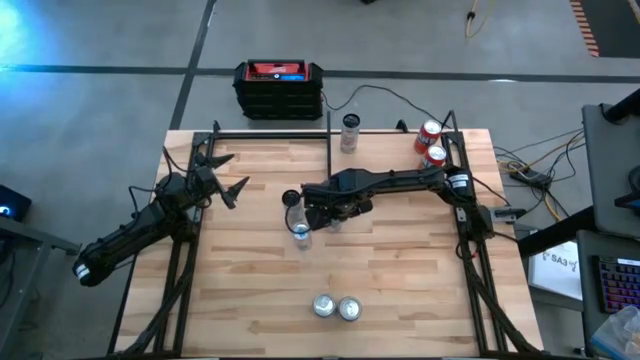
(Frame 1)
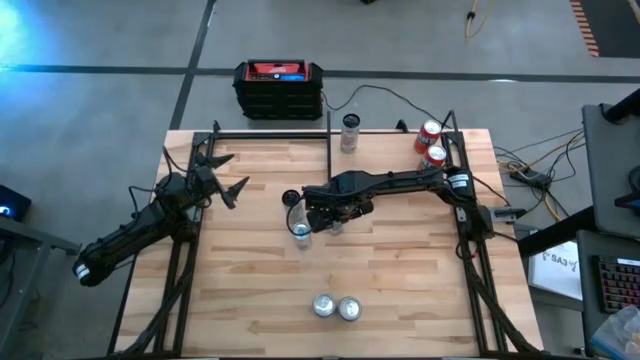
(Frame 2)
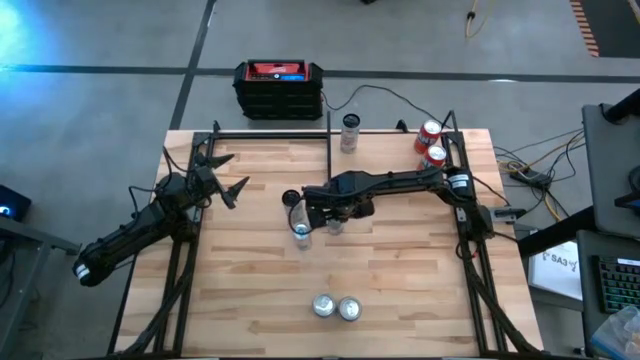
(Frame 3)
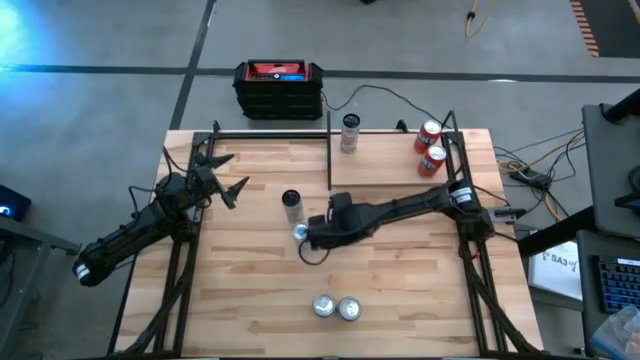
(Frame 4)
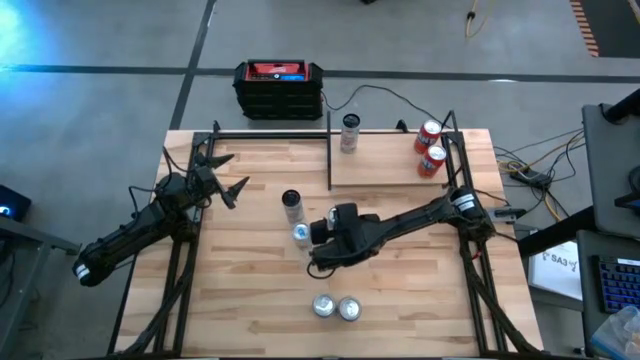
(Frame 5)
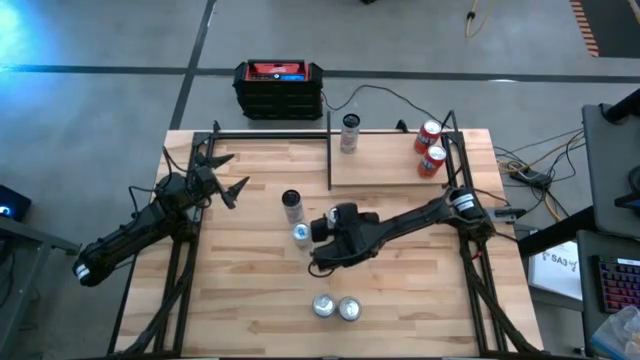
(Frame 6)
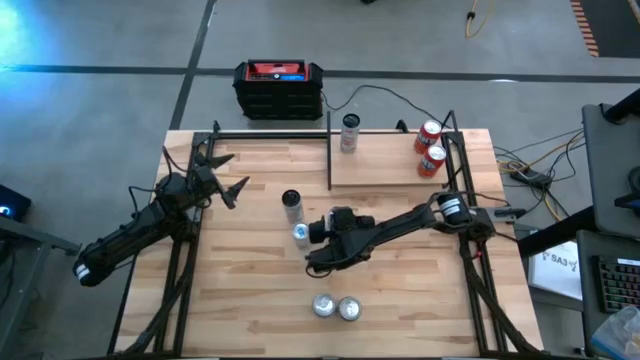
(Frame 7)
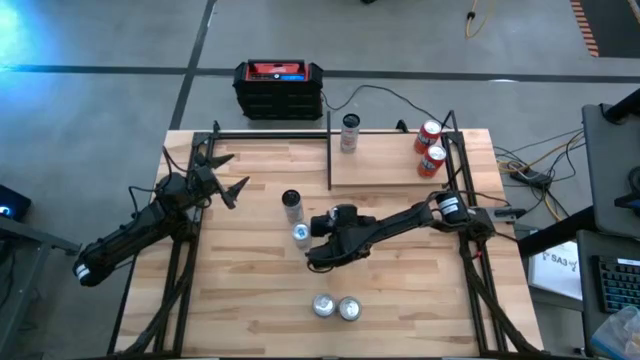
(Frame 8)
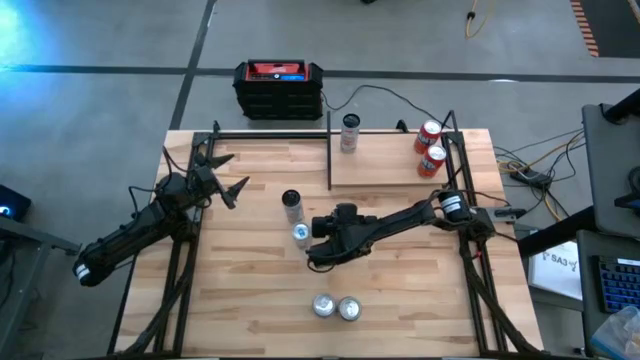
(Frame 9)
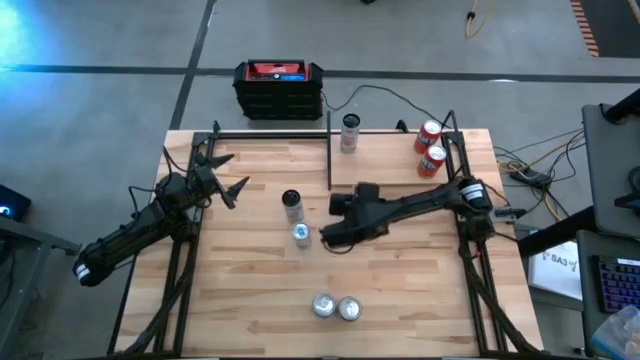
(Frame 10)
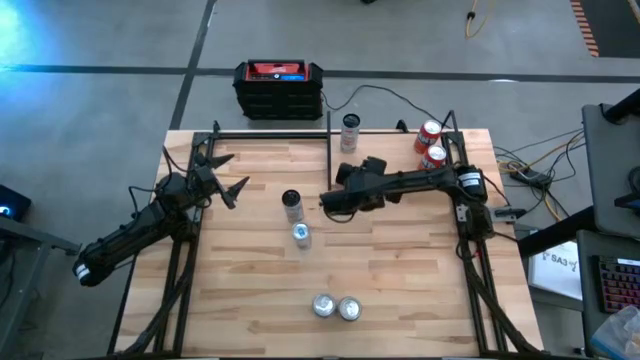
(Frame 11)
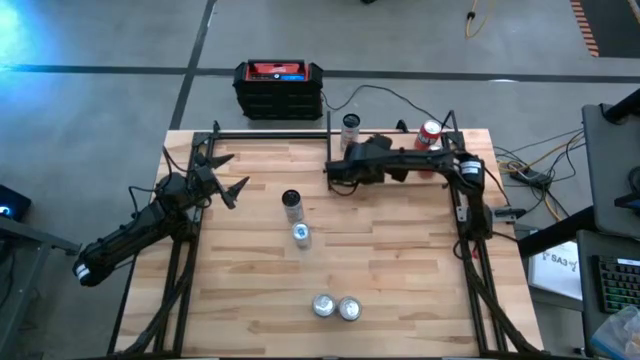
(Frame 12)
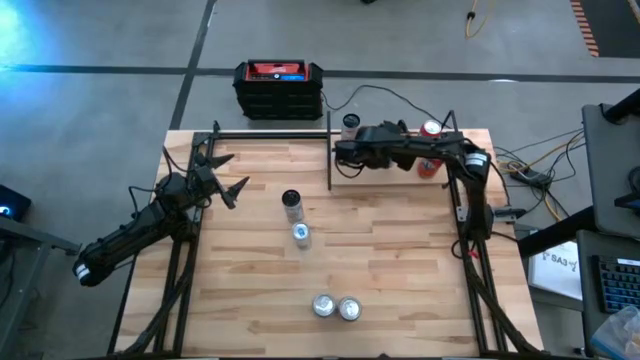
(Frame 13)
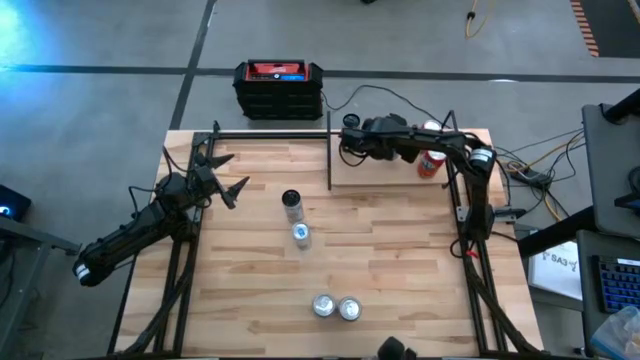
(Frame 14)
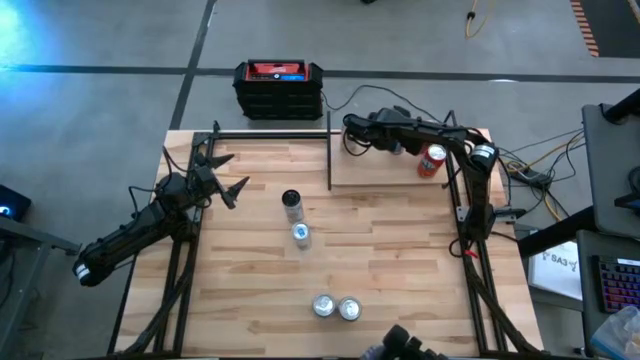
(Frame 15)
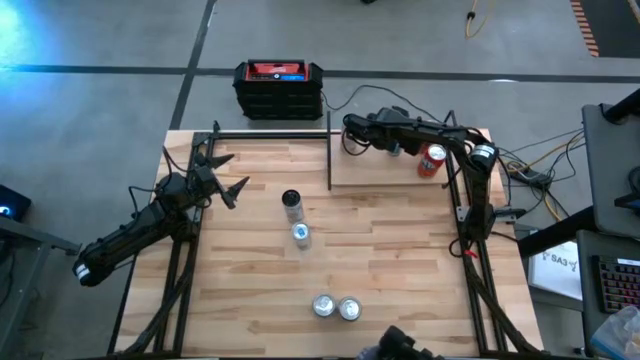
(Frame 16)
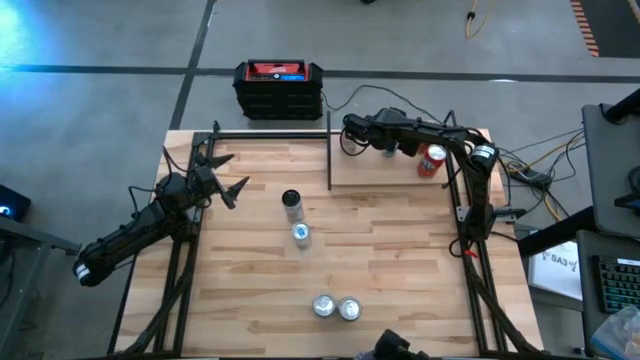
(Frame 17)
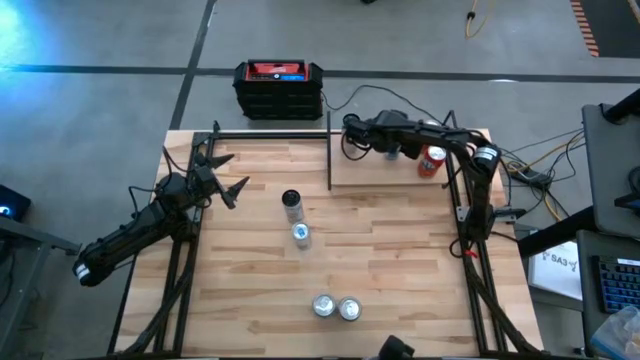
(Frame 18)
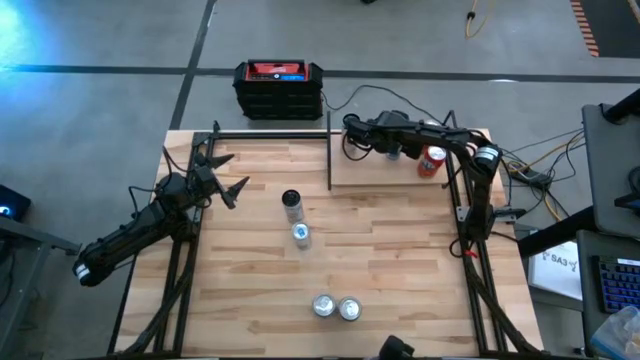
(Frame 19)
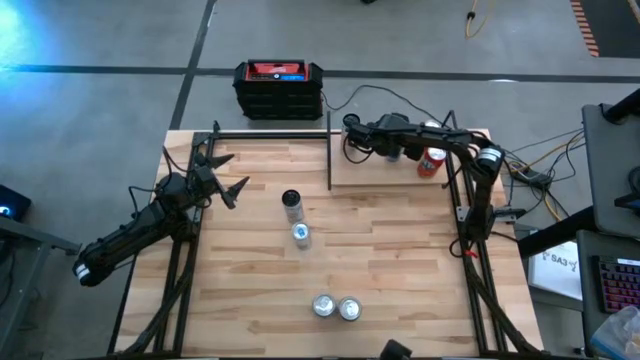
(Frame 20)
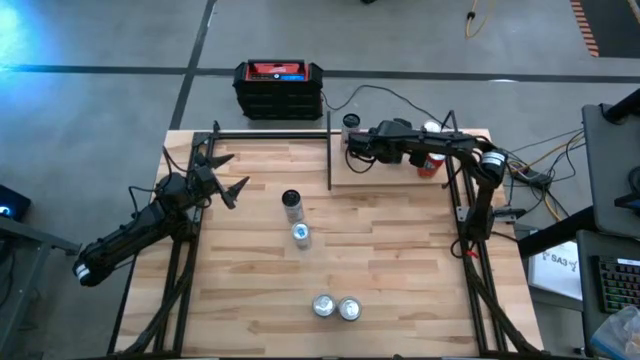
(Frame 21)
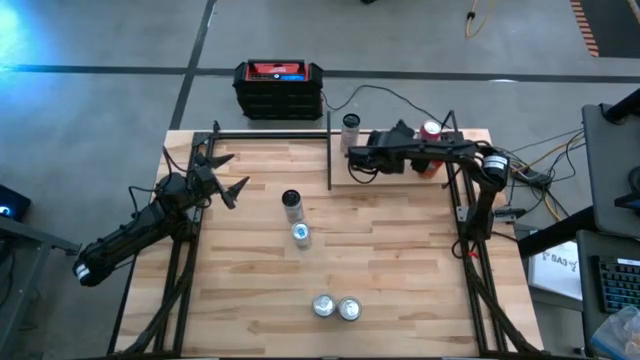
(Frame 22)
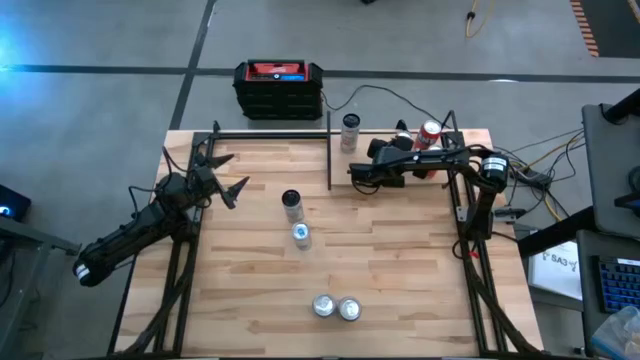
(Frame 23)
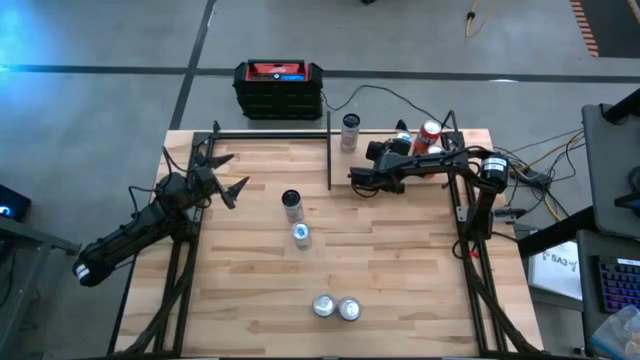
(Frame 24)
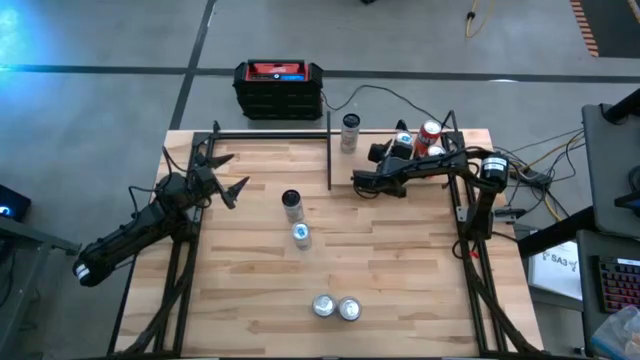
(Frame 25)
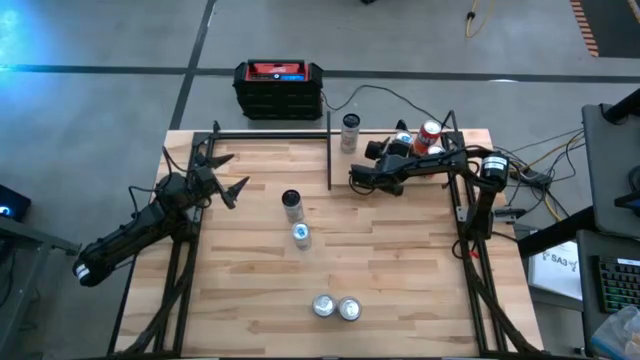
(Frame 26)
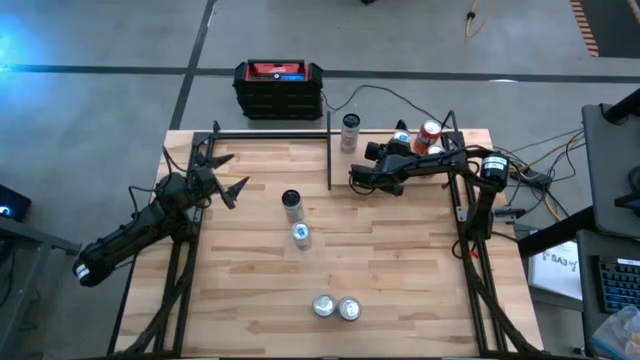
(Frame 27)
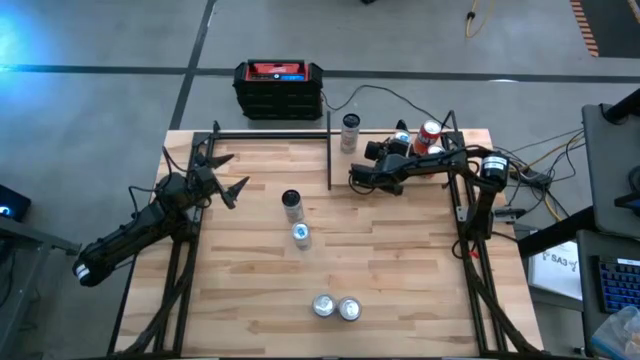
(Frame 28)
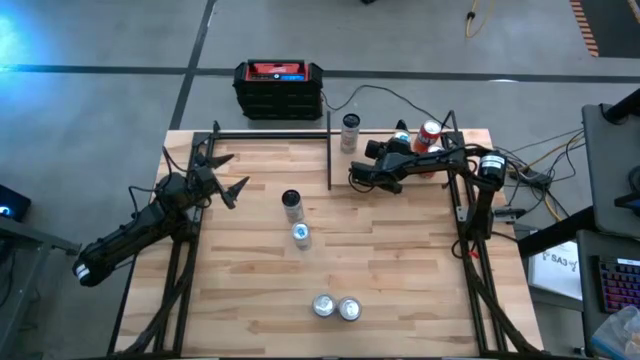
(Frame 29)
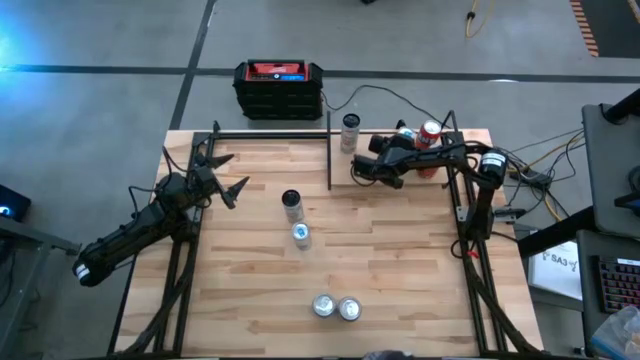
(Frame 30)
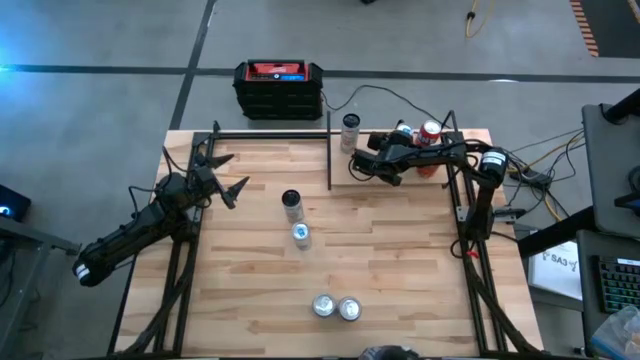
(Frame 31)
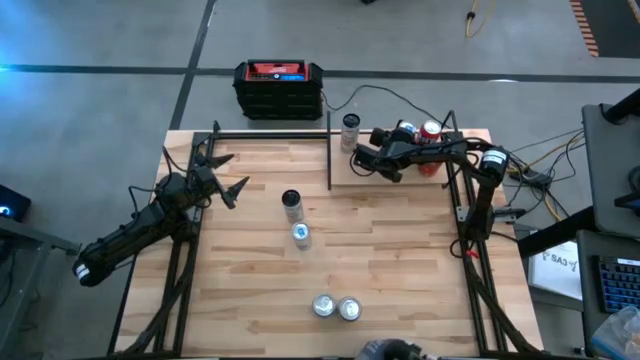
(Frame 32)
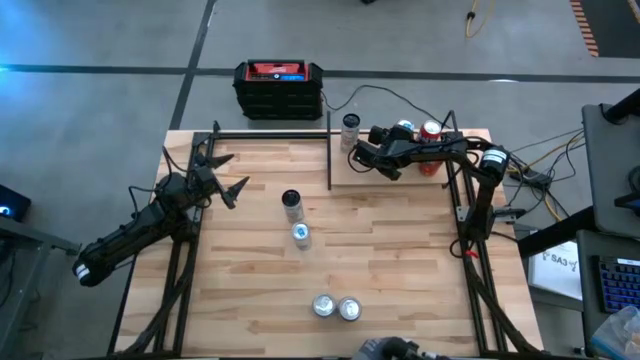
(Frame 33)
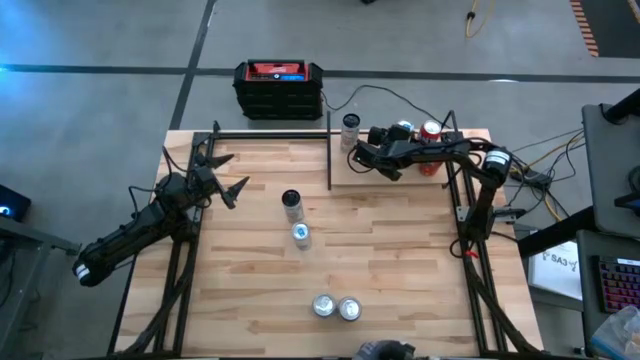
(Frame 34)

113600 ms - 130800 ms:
Task: Place canned beverage on shelf
Put the right blue soda can on the shelf

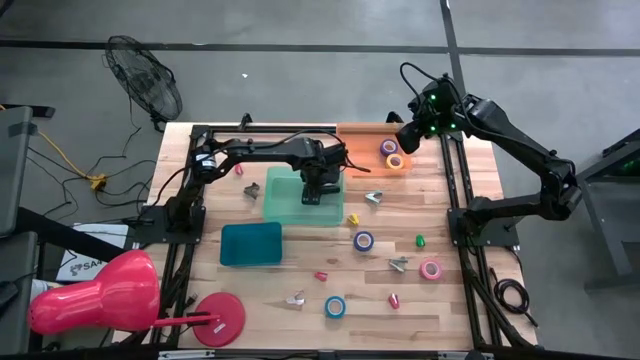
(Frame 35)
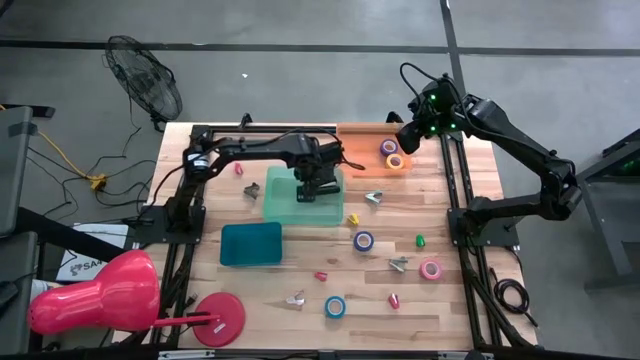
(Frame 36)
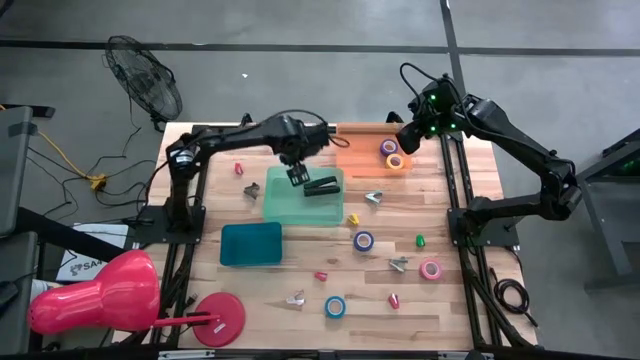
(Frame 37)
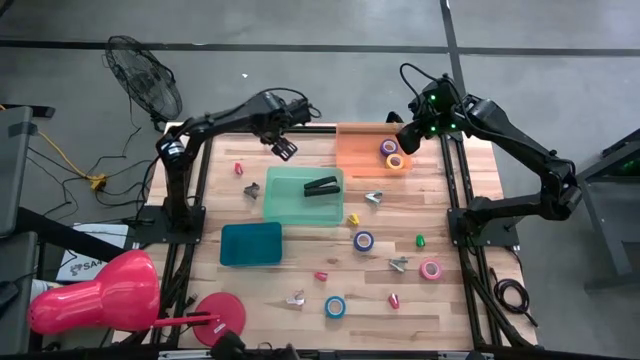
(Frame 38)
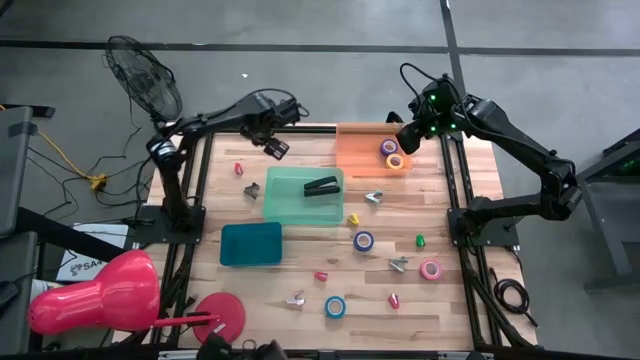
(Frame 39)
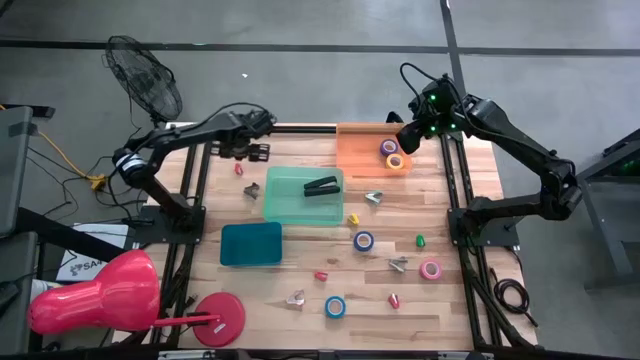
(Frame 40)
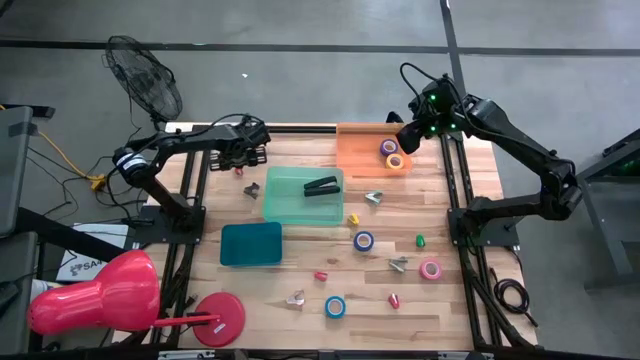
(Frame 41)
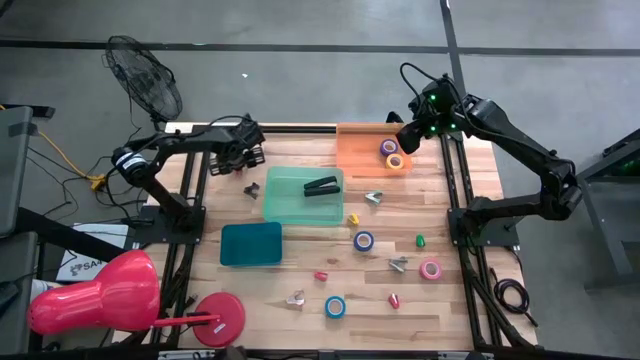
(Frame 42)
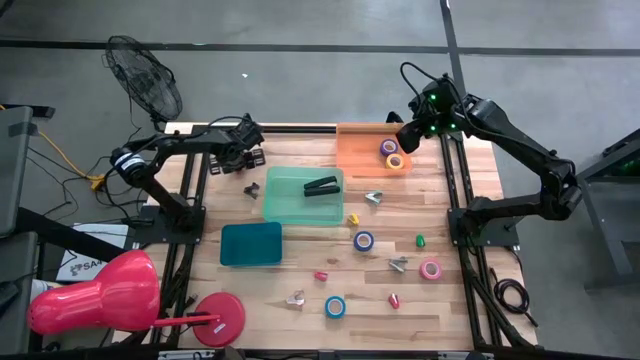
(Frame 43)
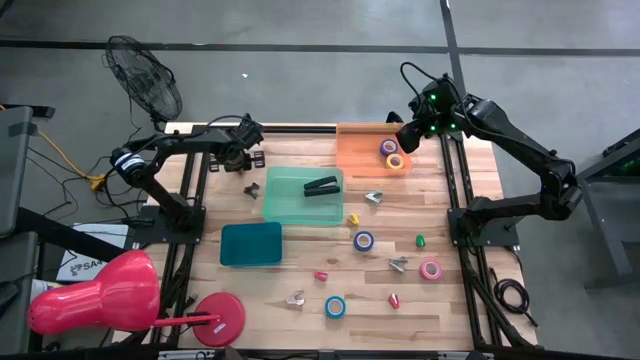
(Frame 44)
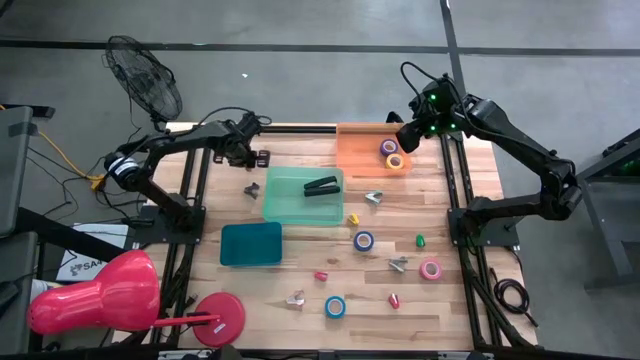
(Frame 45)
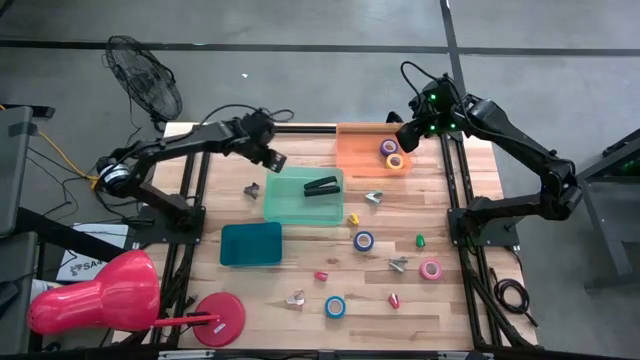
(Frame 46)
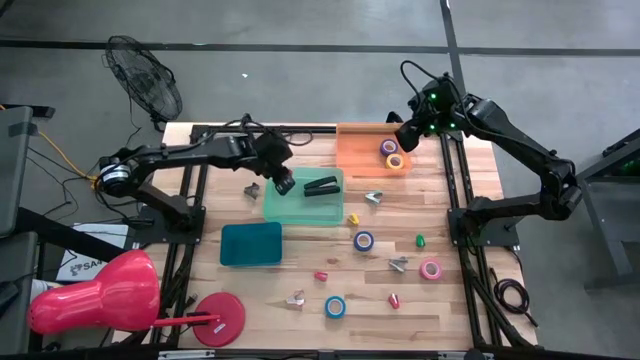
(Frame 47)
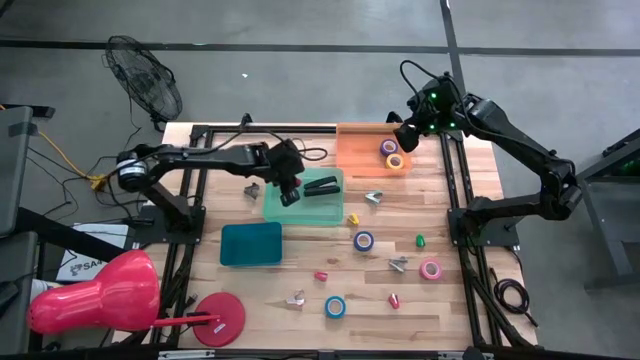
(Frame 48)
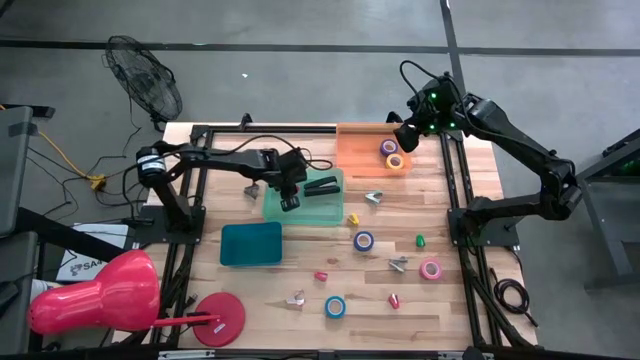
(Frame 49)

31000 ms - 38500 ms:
Task: Pick and place Stapler, Stapler remover, tape
Put the top red small staple remover in the light green bin
